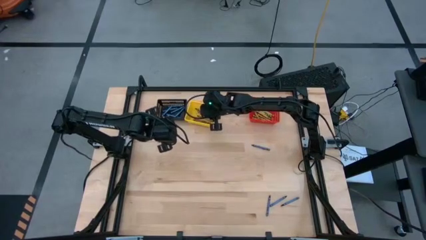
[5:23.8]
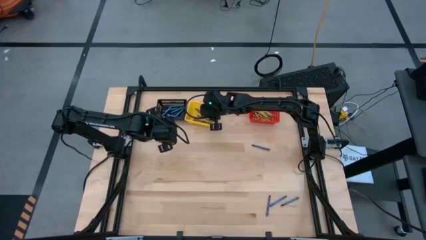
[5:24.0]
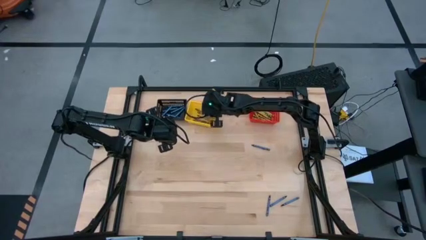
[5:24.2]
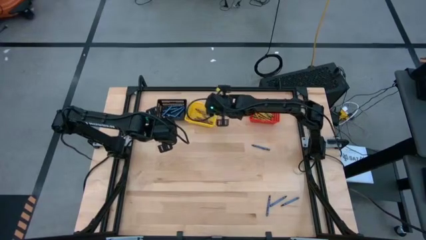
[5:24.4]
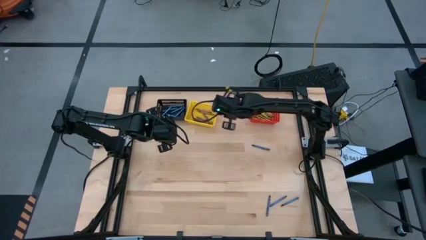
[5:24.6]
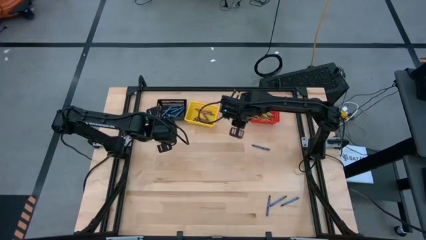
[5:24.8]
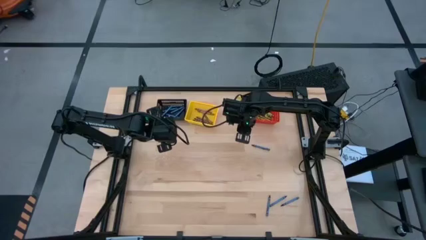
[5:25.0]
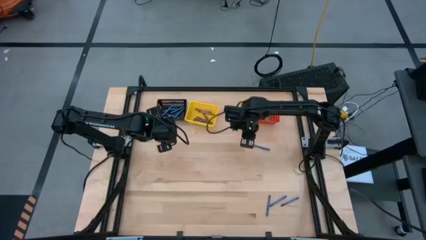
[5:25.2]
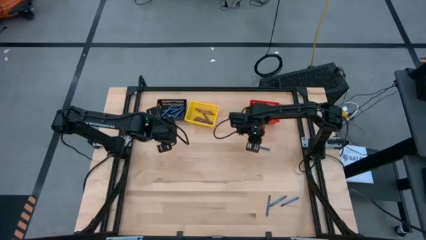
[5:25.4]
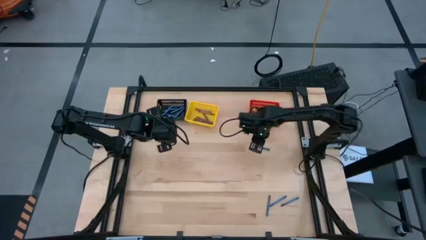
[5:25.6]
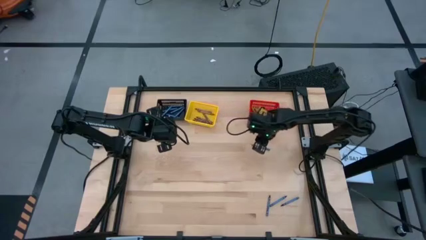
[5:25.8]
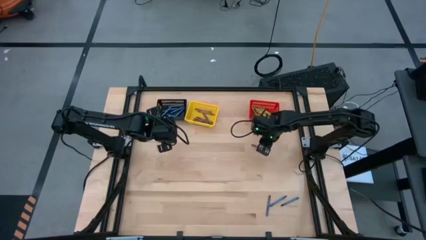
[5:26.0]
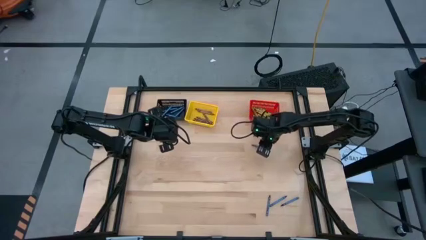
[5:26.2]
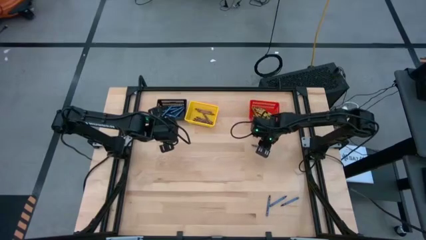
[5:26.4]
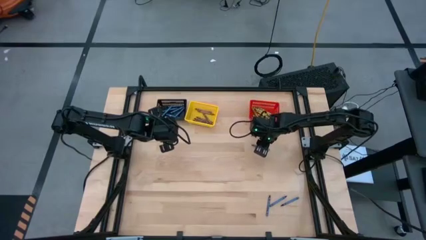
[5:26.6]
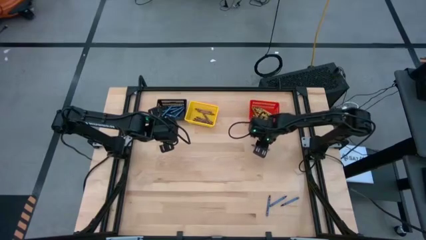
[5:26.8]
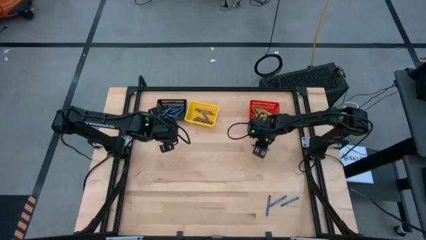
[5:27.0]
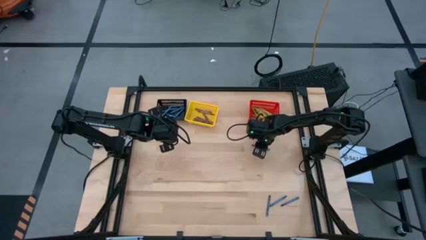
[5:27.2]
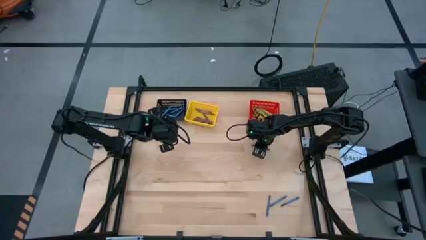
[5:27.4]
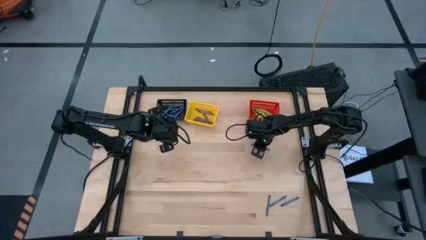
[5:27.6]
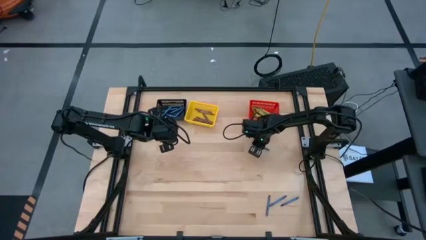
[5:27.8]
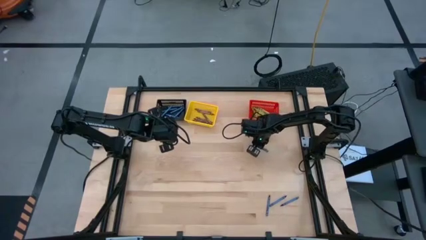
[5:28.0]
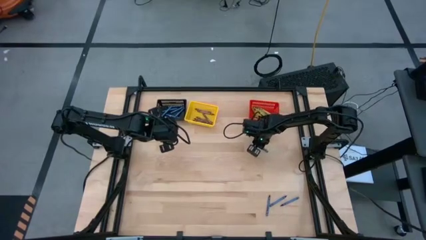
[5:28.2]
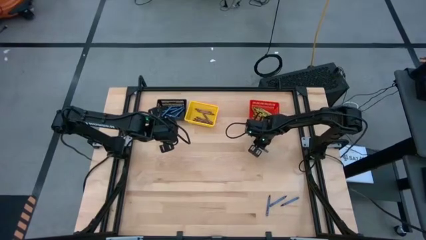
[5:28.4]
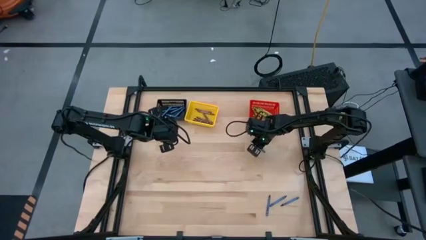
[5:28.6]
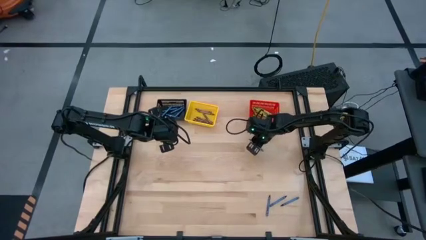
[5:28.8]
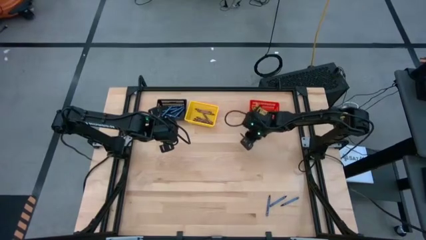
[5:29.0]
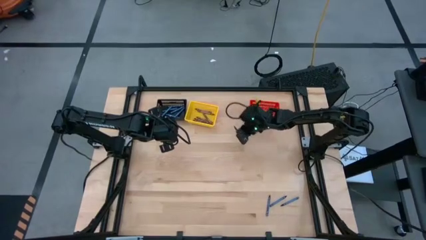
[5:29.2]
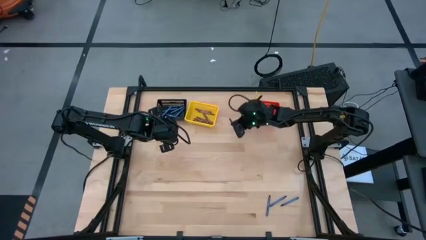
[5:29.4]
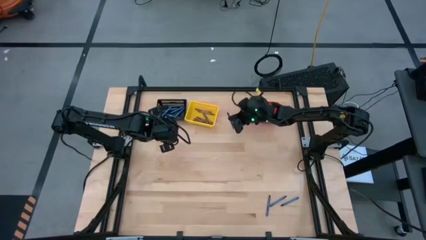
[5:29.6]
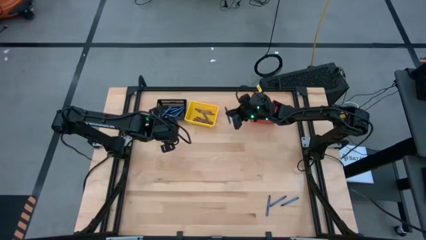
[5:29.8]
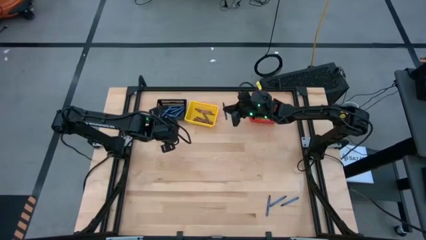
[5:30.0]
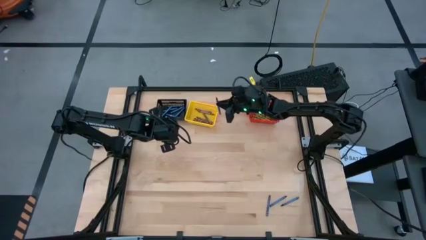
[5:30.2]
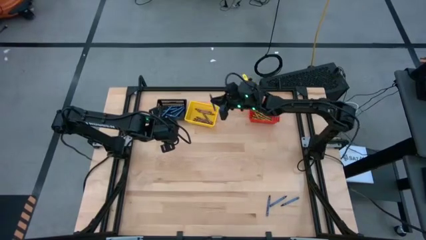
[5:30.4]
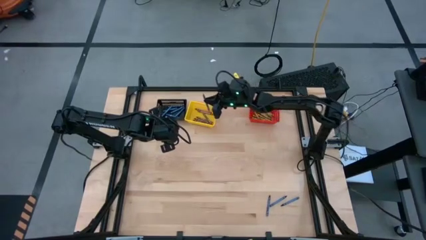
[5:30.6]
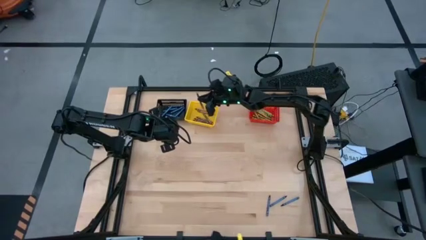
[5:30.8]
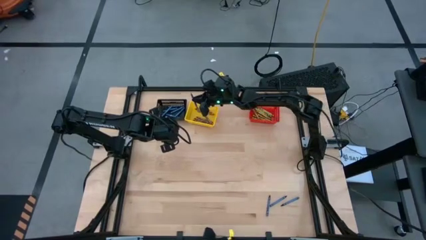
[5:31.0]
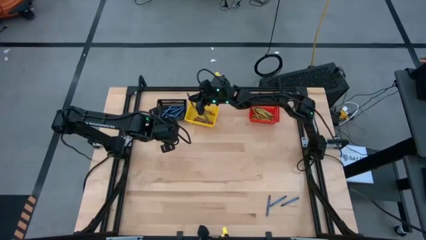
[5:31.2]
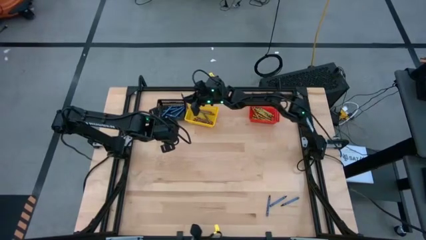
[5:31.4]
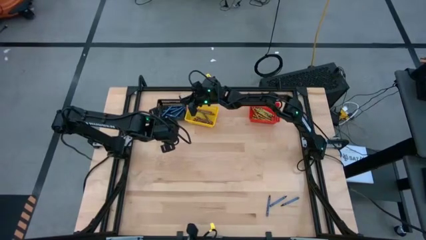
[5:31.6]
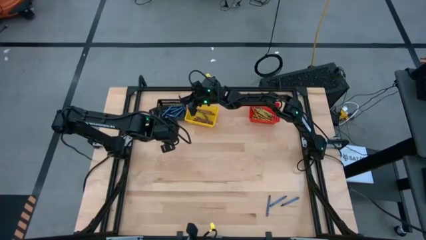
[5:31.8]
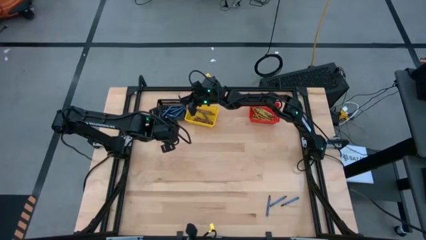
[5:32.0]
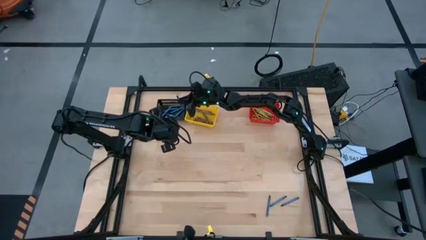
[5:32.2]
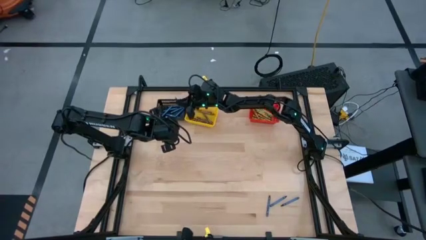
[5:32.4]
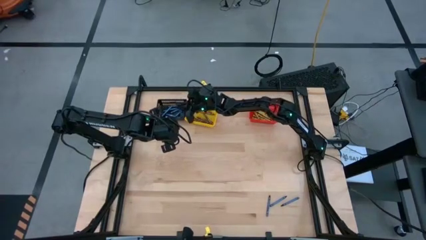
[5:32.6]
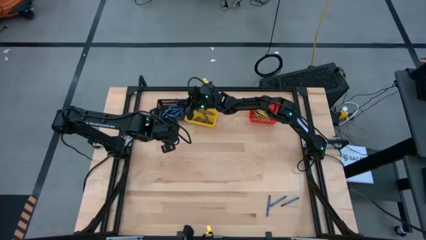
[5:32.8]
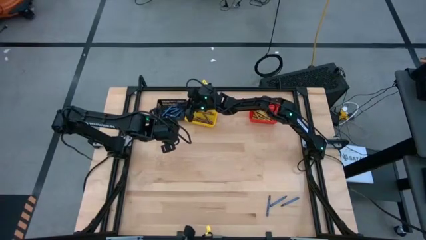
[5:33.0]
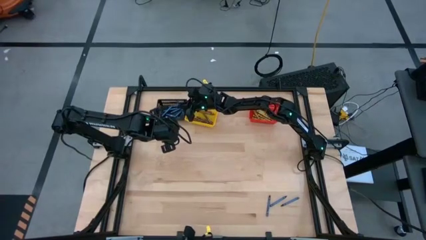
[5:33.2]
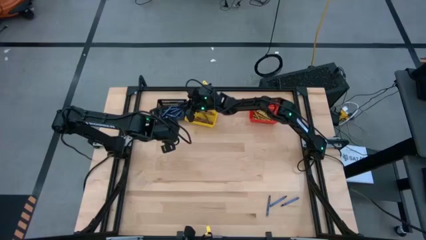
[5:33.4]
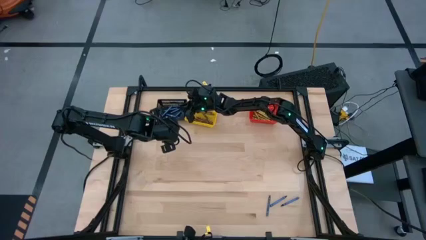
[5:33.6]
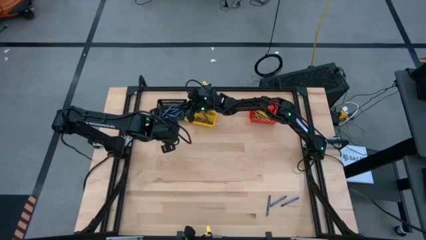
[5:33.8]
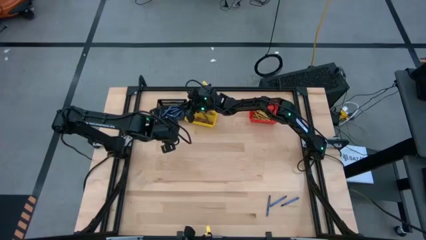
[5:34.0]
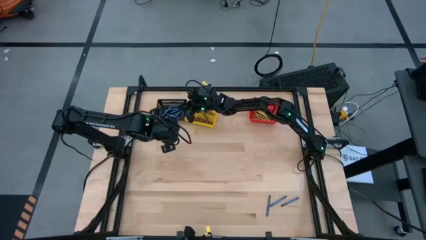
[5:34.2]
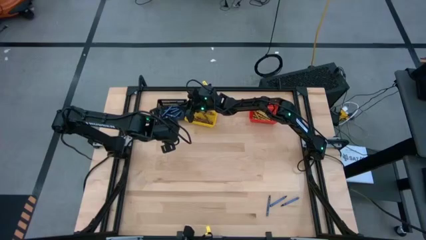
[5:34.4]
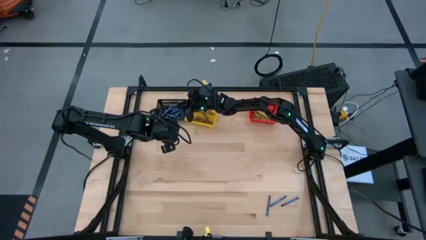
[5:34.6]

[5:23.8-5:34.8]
Task: Sort crayons
Put the blue crayon into the black bin

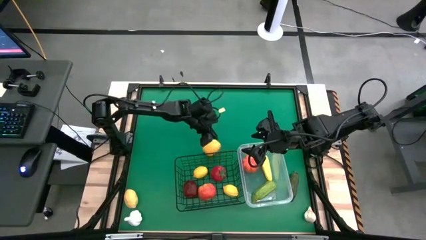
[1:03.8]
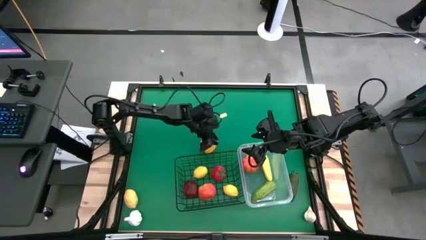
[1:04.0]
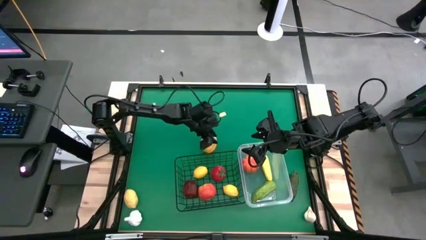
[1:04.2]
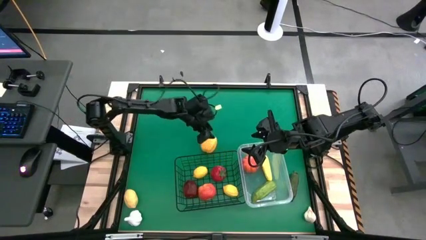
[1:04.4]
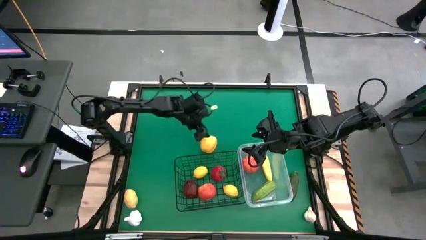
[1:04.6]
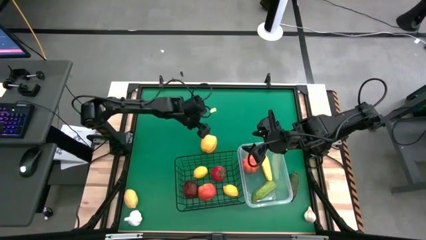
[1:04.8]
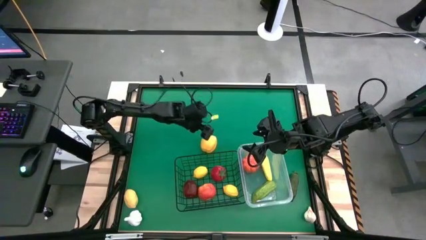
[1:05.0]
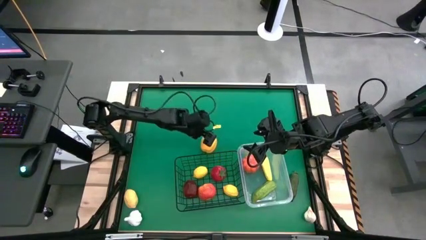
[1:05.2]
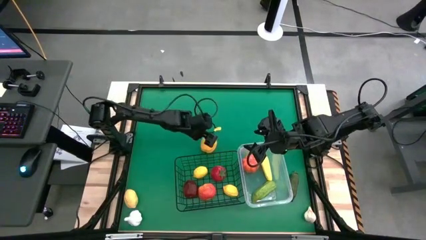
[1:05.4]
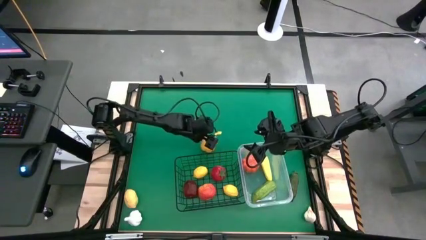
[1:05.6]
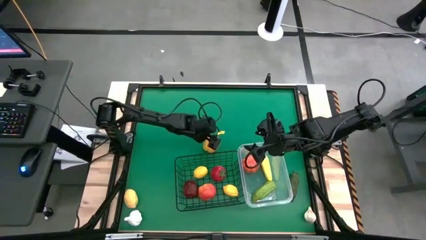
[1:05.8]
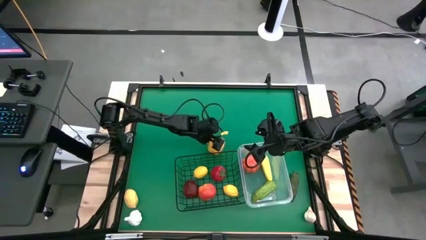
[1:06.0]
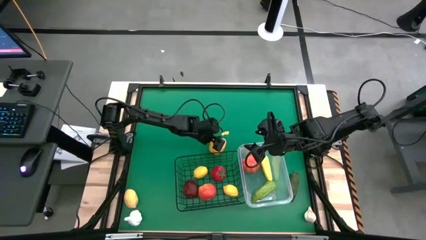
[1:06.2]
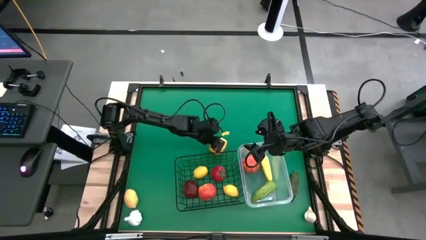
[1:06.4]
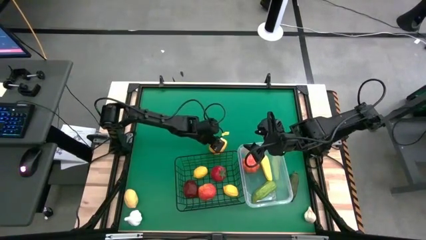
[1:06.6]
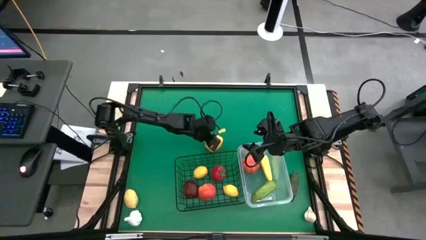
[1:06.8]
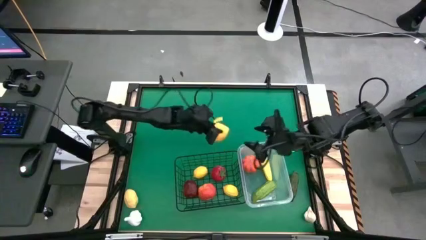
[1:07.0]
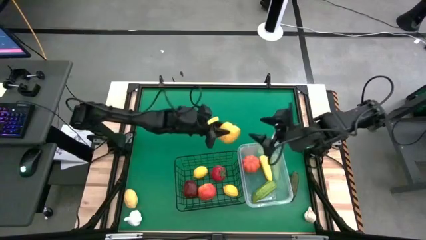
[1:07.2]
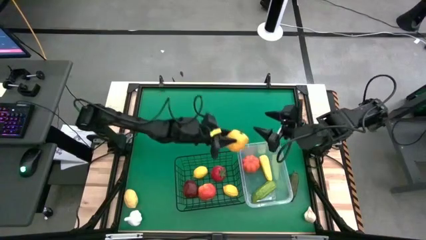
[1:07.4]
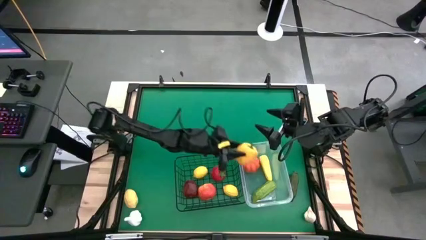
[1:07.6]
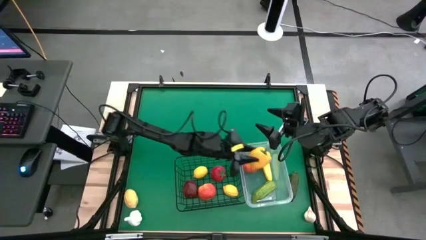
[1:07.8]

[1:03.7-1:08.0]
Task: Sort produce into baskets
Put the bell pepper into the transparent bin
